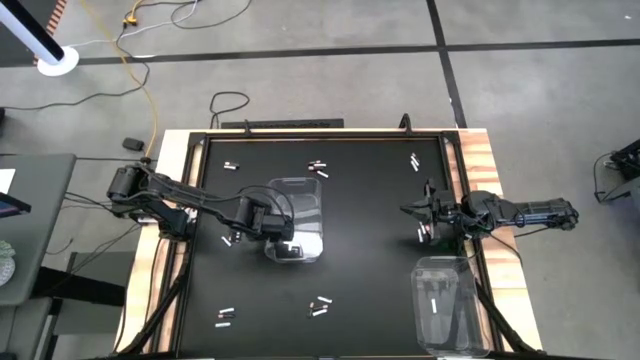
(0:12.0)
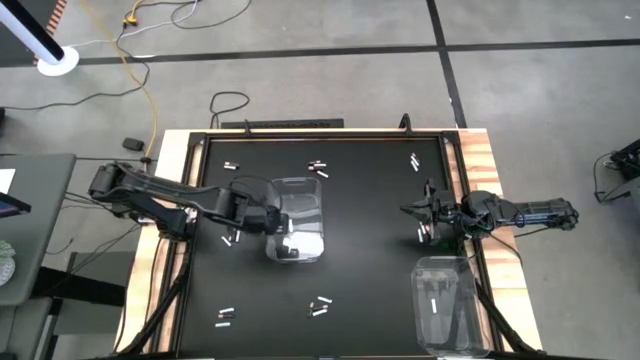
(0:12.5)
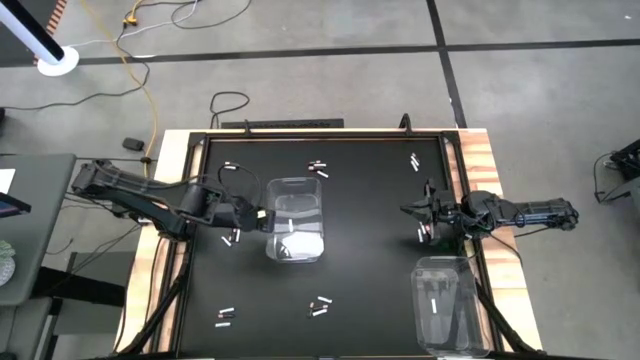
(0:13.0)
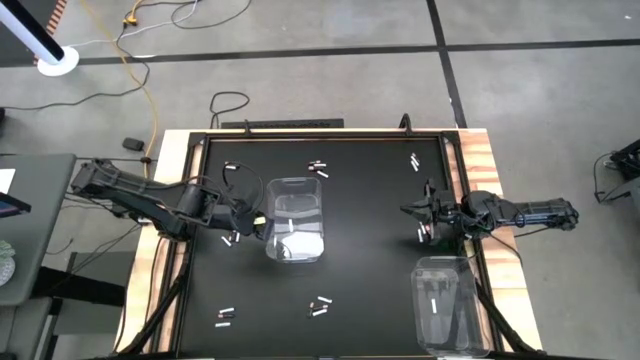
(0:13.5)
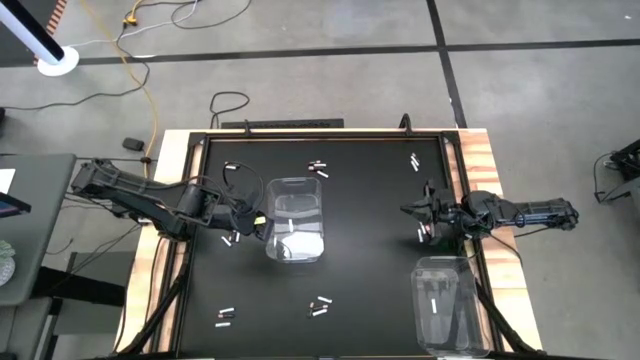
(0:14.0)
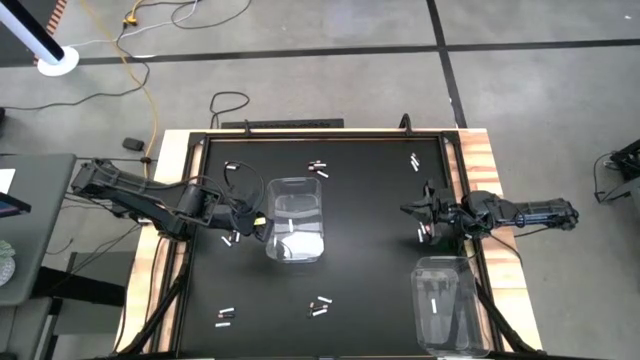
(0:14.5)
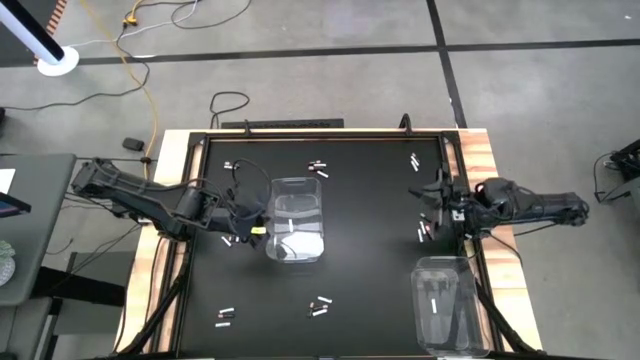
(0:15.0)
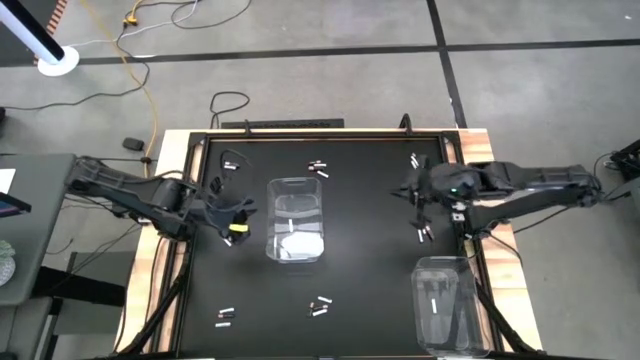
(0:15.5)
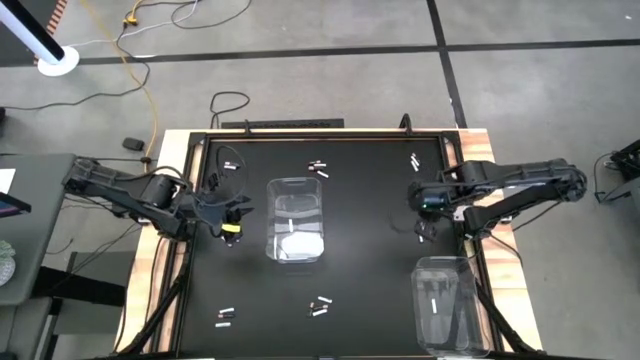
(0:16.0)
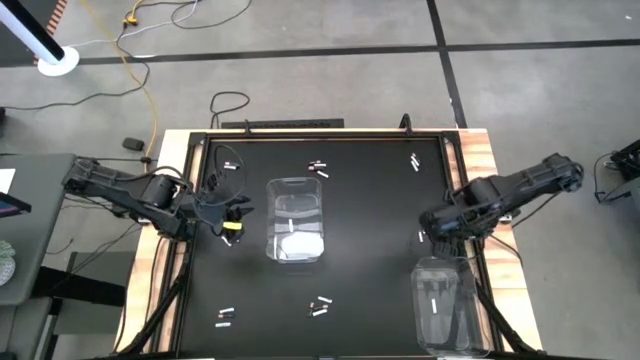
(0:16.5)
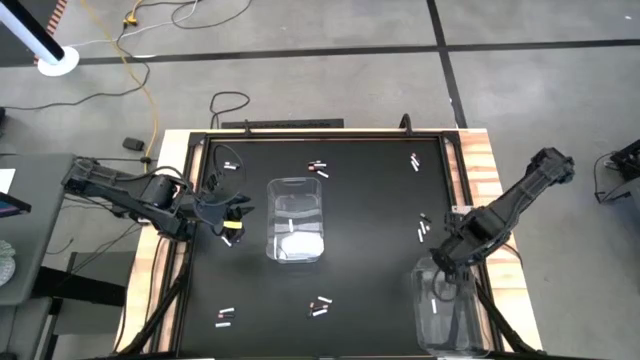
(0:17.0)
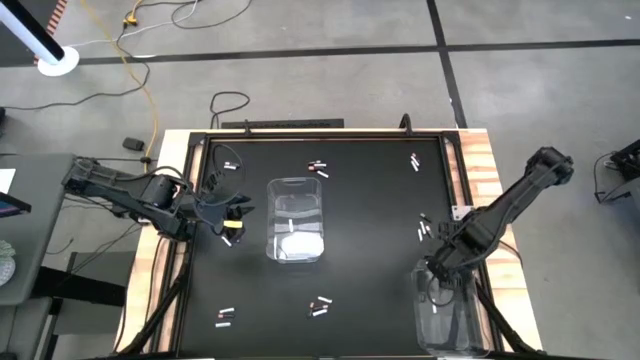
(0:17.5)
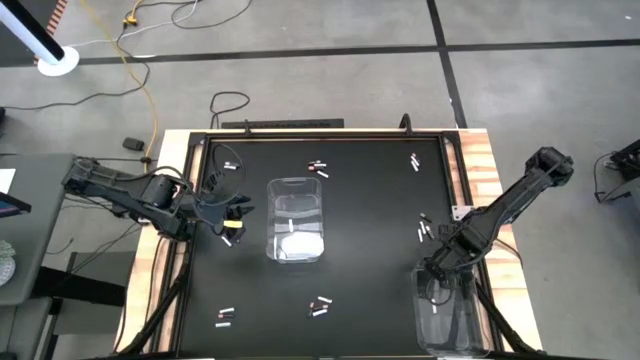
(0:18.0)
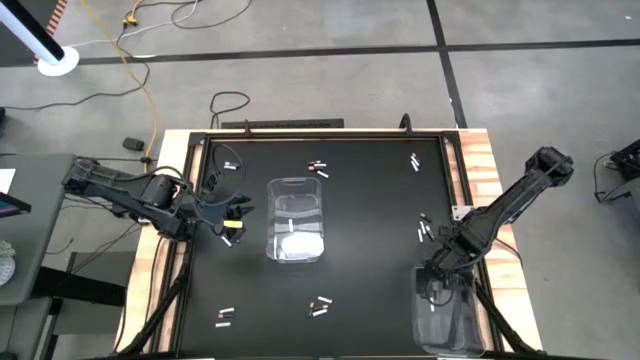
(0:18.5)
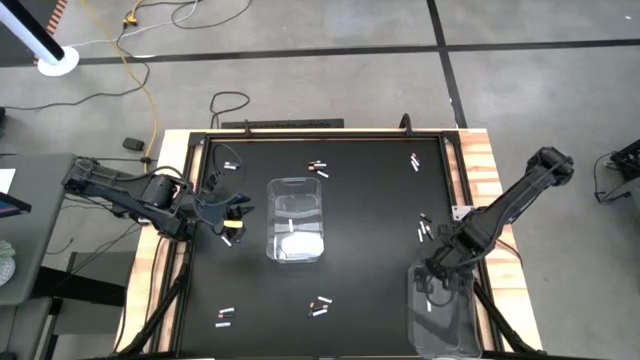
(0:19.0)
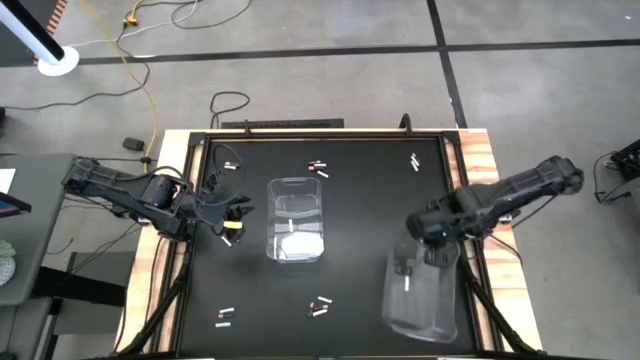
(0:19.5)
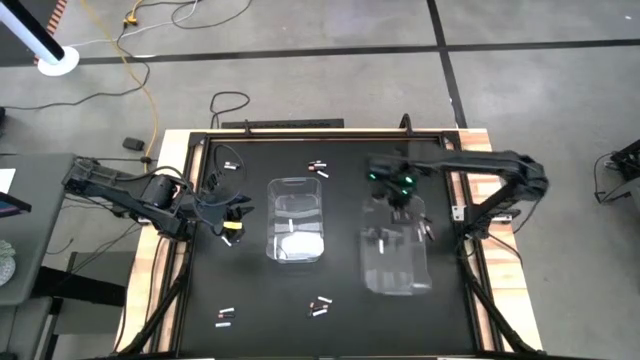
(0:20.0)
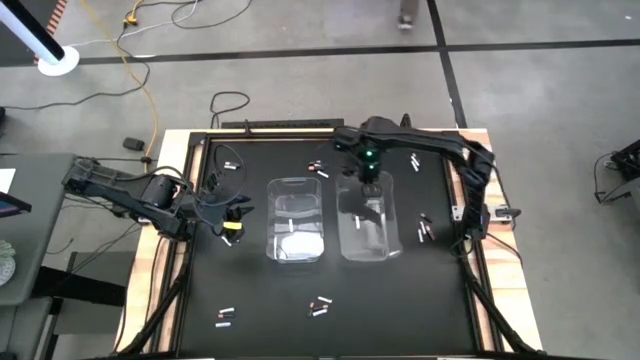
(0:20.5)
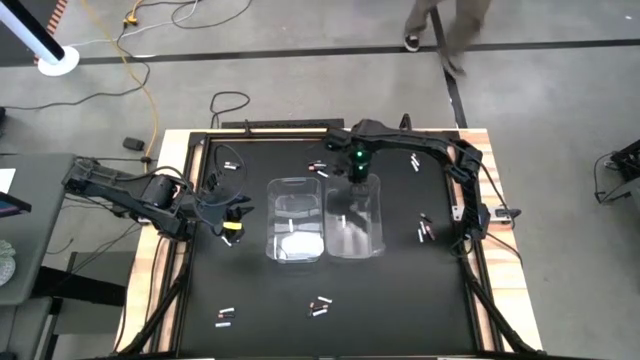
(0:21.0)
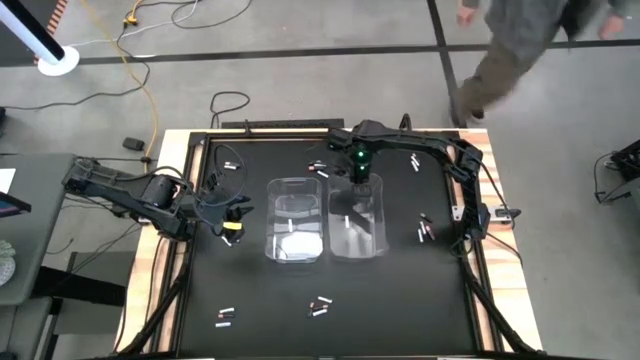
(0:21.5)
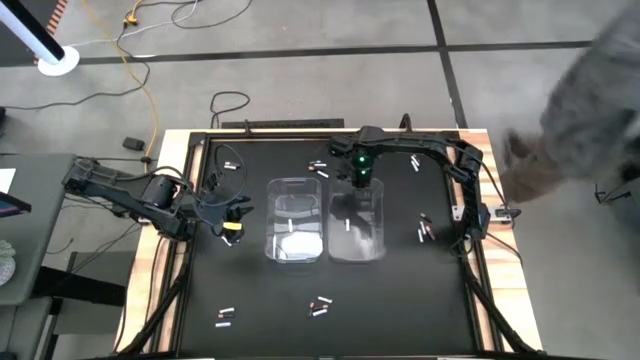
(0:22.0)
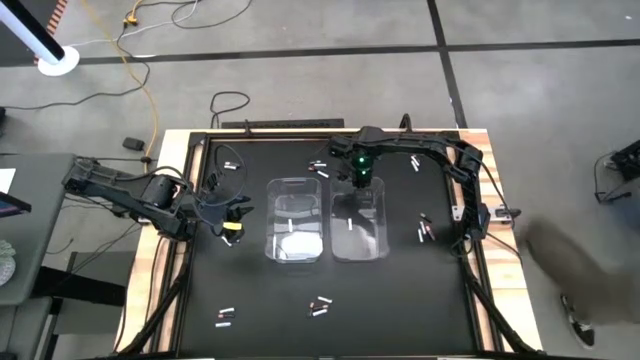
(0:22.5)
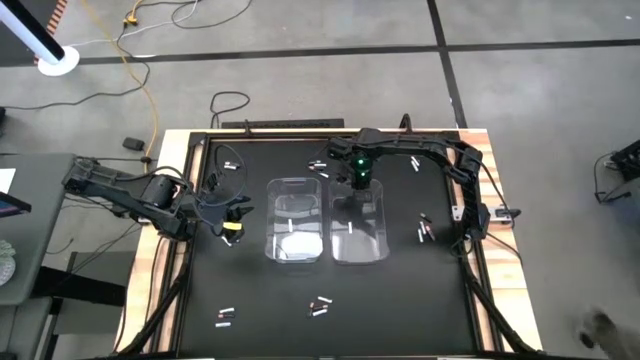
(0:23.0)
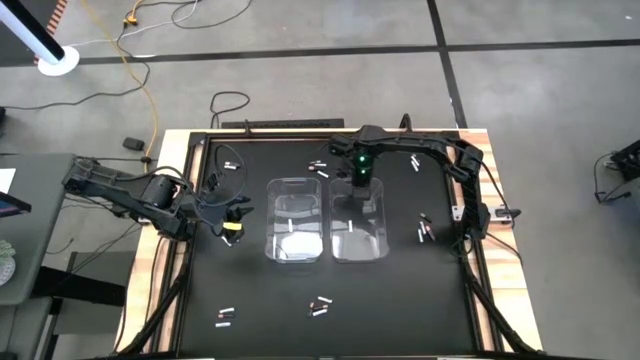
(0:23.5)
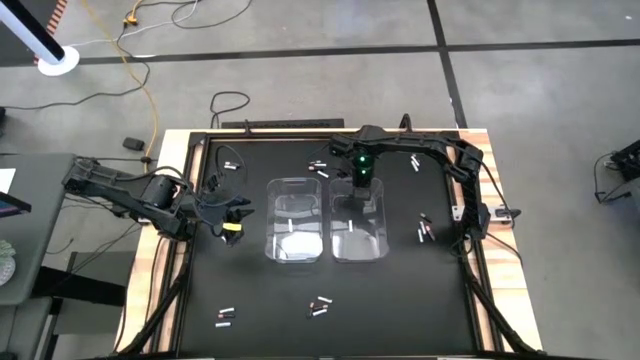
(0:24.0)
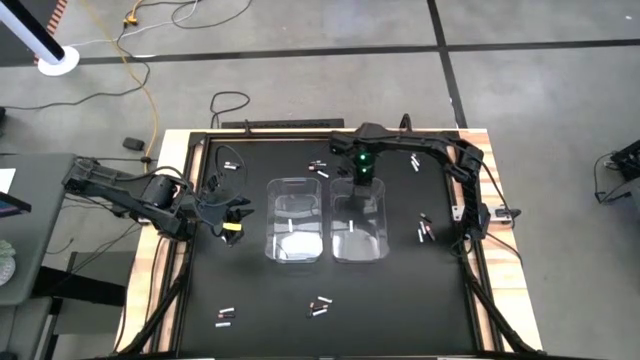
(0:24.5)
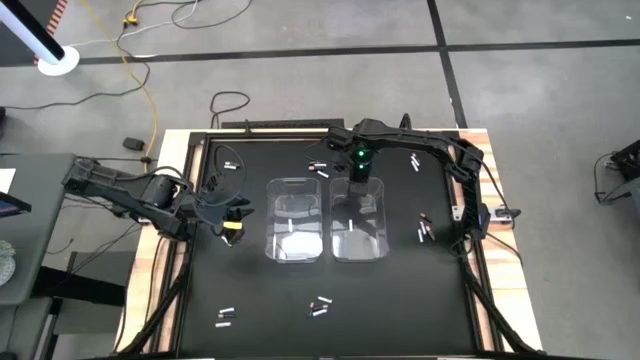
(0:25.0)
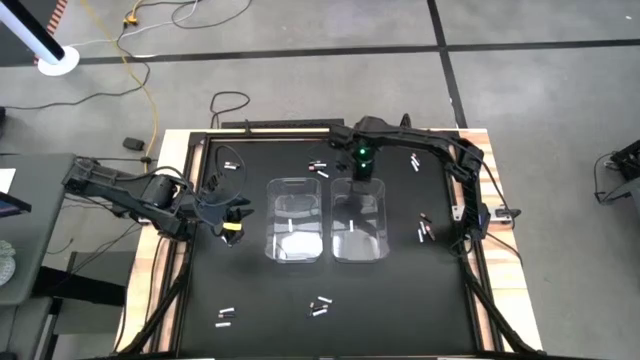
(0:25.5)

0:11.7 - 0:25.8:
Task: Sort batteries
Move the bottom transparent bin to the center of the table
